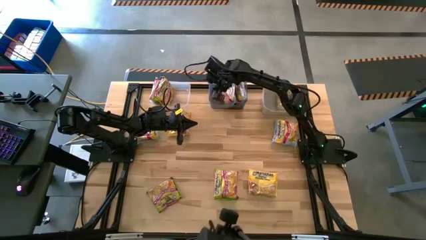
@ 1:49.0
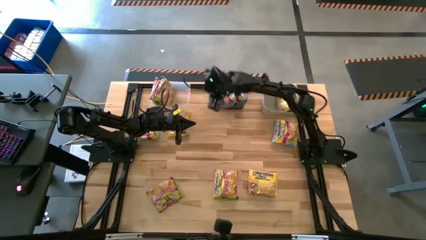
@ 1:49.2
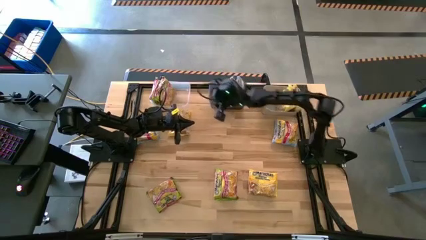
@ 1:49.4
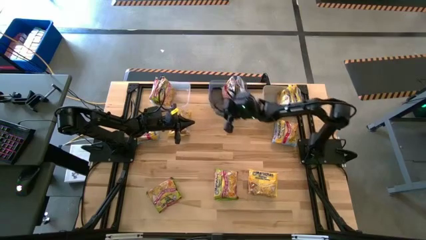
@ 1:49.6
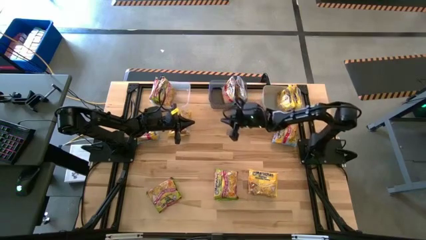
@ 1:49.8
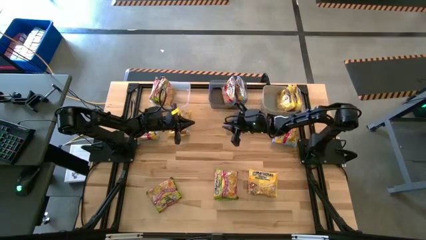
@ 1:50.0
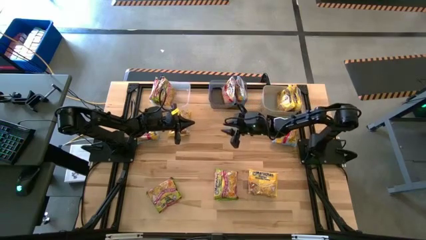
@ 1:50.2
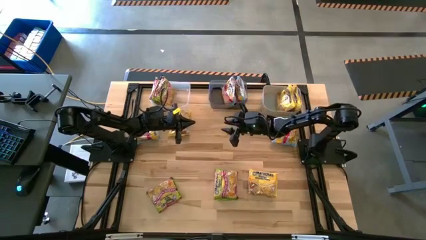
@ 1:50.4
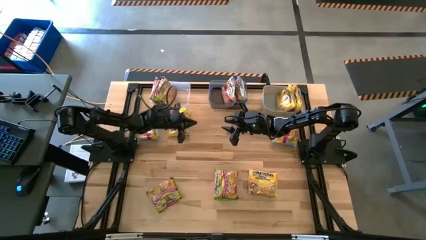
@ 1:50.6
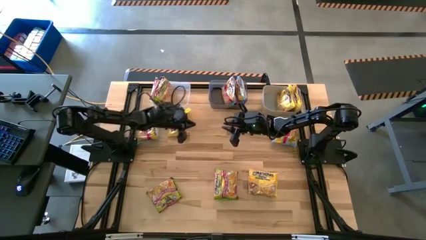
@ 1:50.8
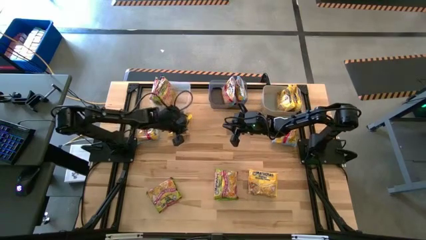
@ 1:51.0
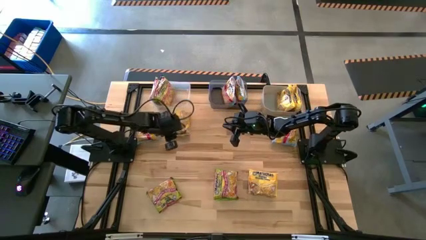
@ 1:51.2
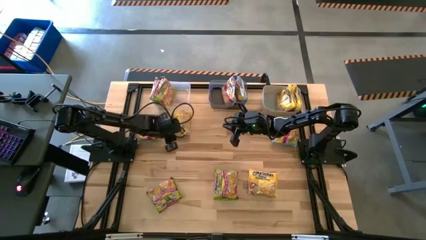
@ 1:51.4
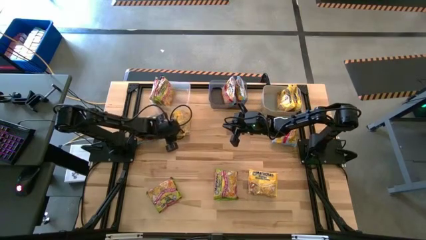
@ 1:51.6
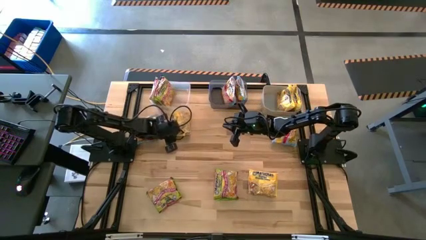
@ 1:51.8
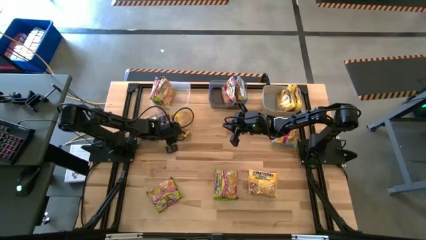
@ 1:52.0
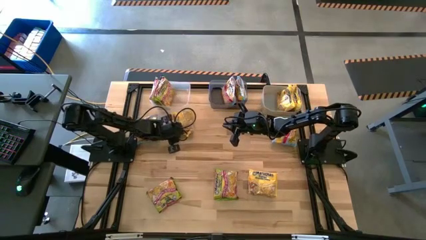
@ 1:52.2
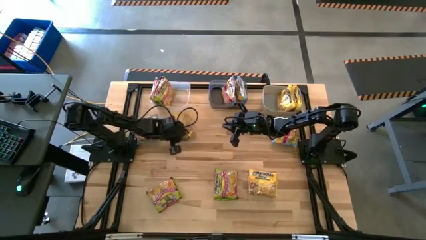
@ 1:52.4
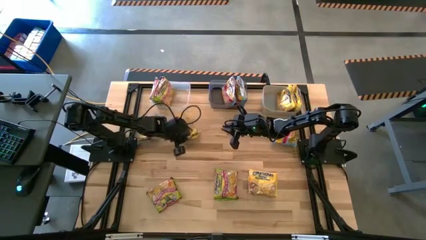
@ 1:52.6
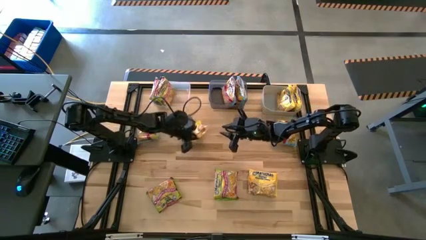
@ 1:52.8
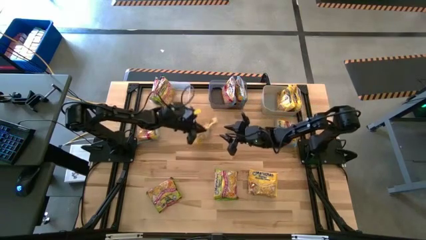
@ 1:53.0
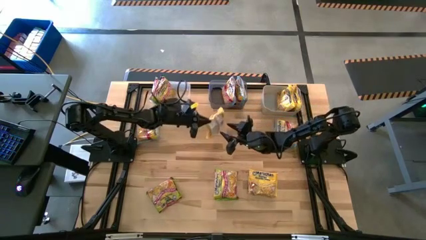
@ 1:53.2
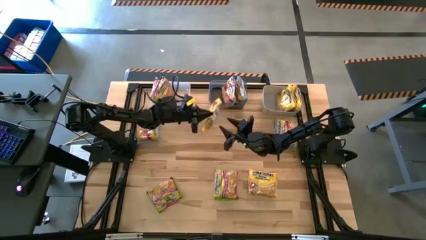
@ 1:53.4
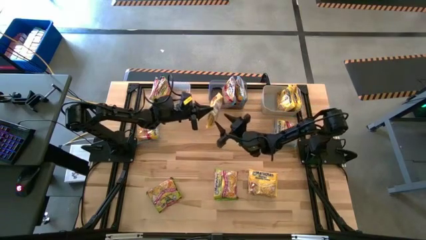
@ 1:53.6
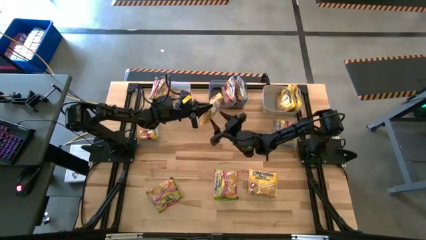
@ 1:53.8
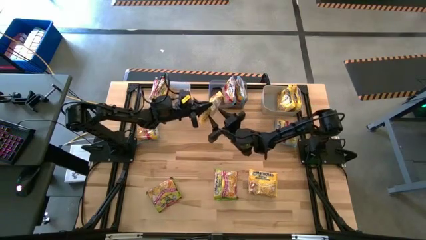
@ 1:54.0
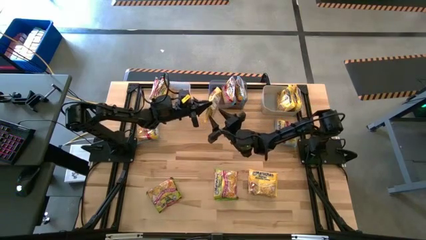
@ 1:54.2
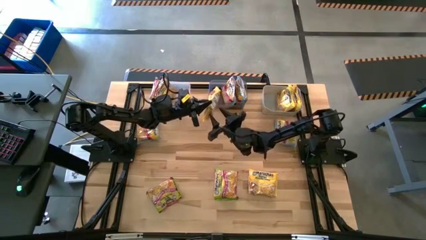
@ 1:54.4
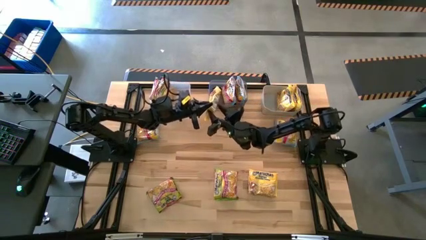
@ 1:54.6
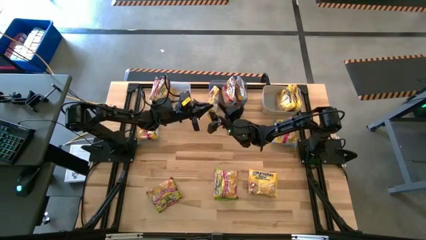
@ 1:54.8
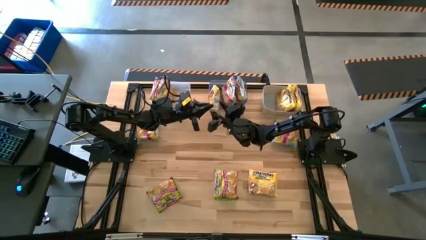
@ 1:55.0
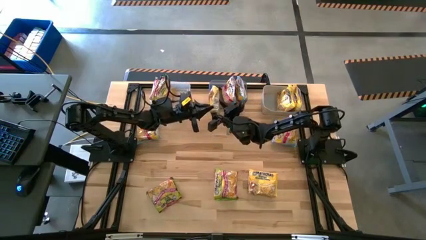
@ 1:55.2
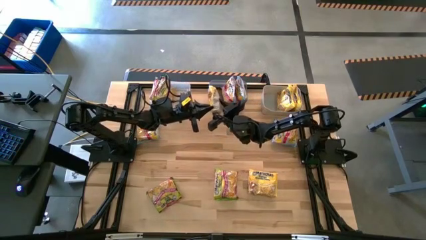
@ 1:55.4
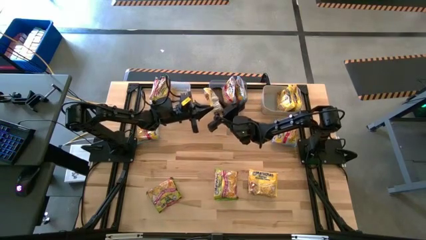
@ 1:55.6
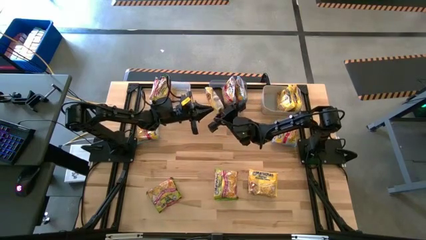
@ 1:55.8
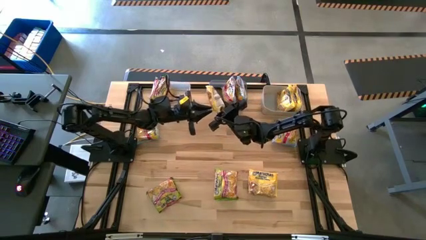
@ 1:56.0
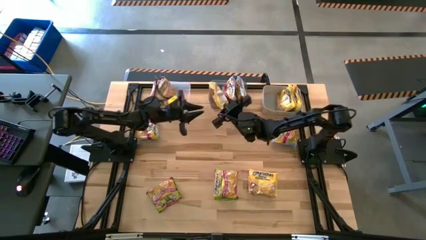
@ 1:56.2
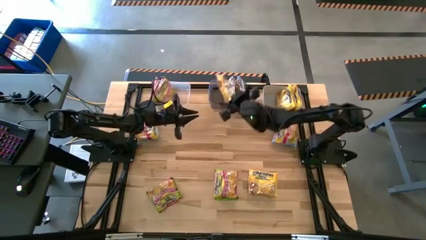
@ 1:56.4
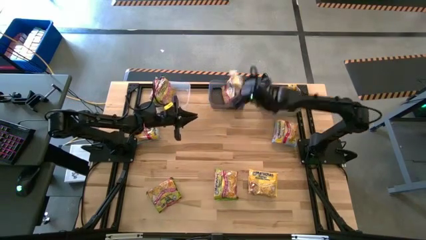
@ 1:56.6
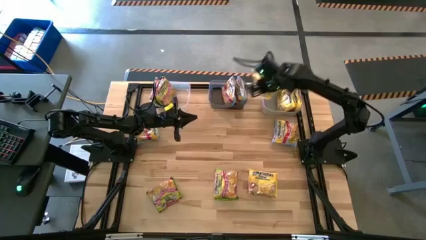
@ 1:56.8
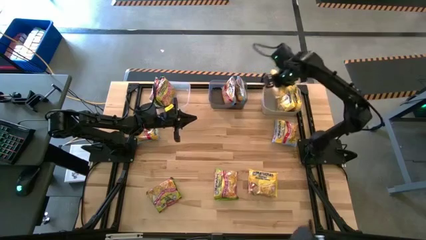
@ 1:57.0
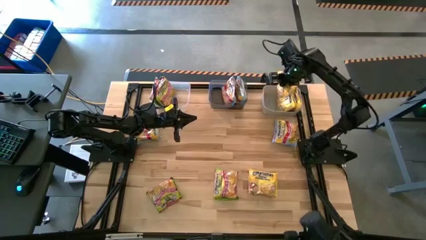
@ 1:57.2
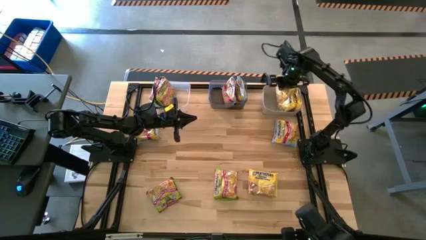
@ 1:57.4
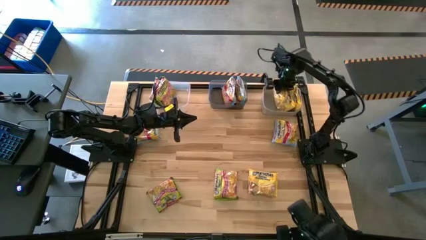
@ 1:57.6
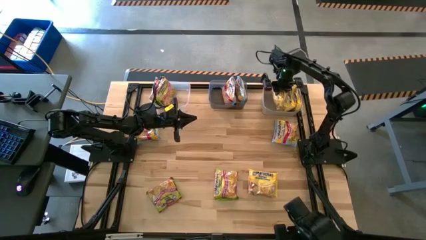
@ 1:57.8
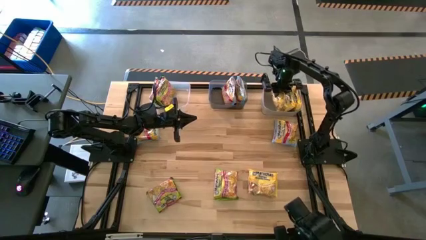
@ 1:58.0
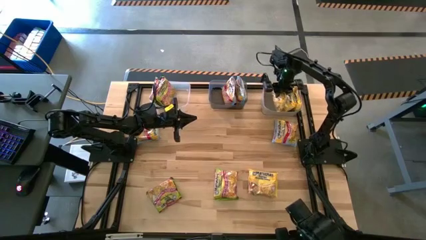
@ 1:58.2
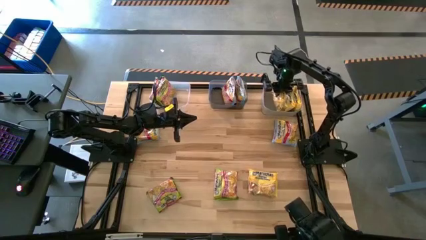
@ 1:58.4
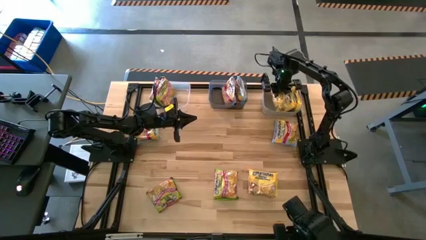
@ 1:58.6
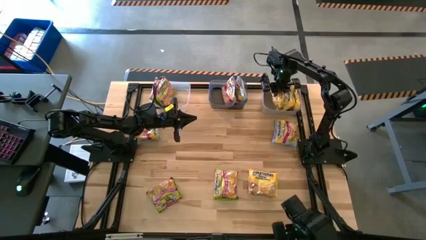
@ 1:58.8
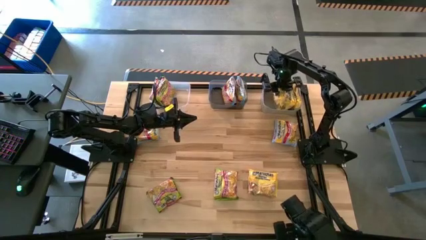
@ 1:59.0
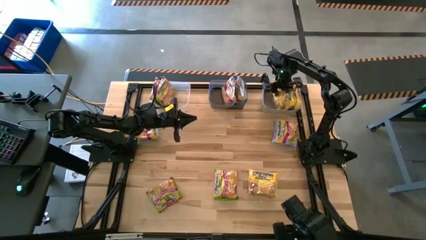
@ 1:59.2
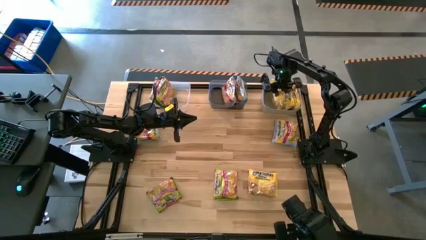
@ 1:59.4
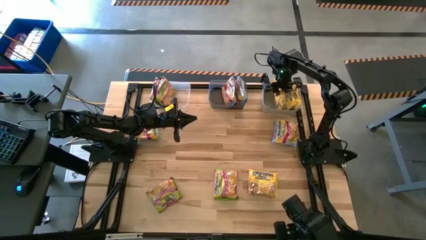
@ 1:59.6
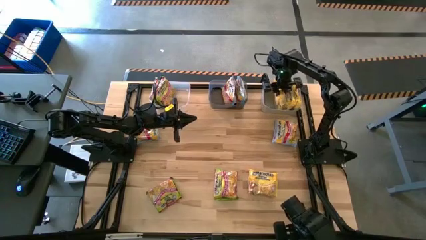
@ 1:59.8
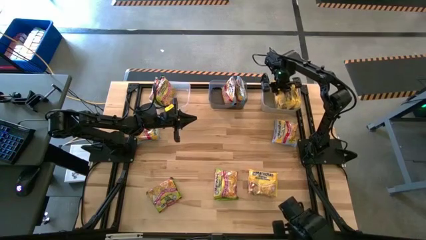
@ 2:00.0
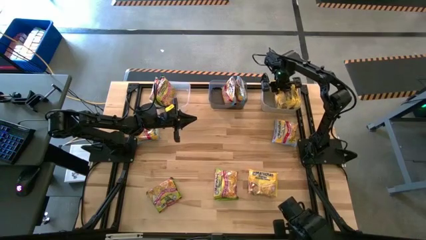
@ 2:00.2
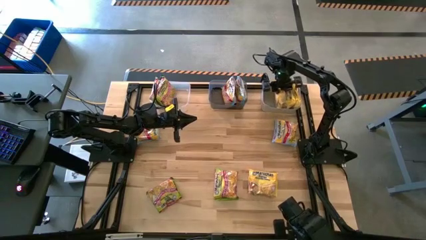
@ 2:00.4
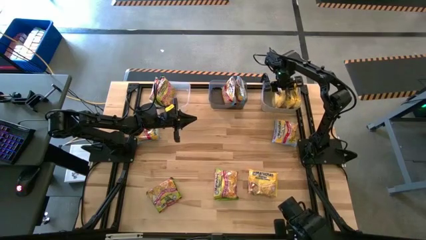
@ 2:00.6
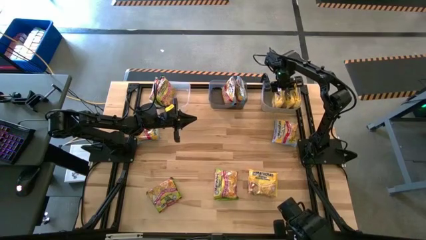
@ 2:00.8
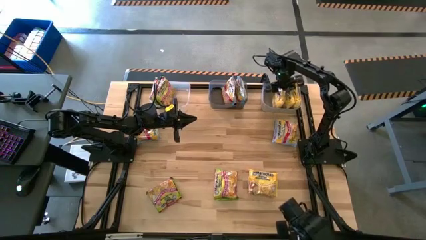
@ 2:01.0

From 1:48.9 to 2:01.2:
Task: Sort Maruchan noodles
Put the top yellow noodle pack into the gray bin

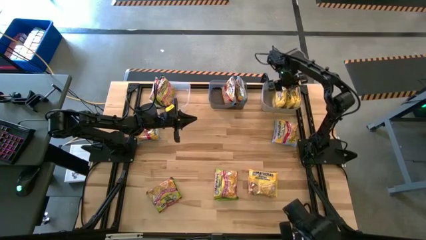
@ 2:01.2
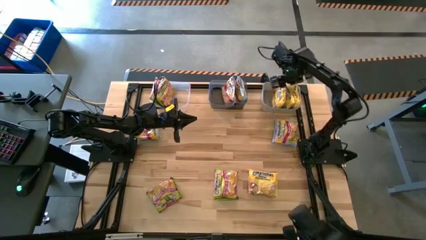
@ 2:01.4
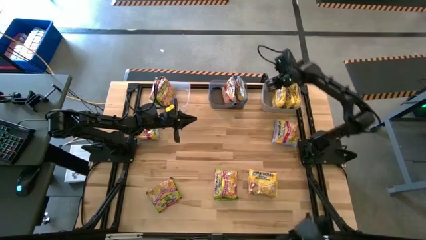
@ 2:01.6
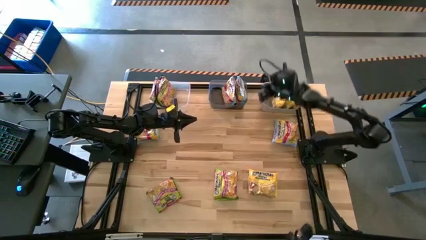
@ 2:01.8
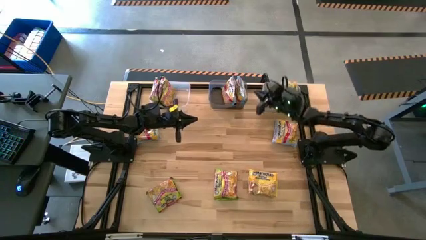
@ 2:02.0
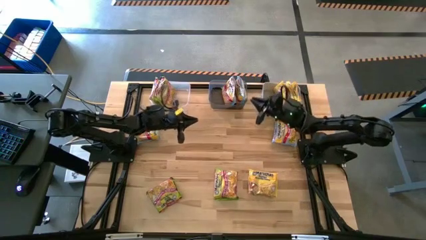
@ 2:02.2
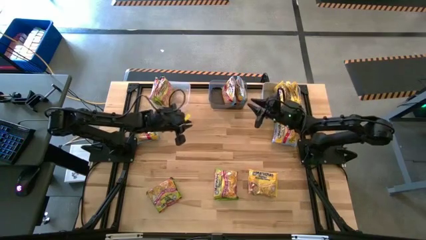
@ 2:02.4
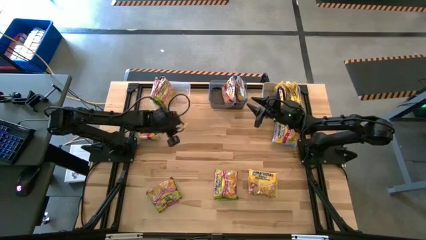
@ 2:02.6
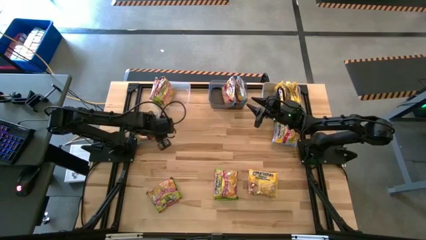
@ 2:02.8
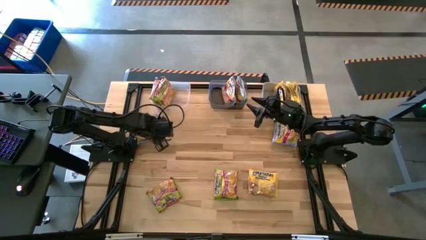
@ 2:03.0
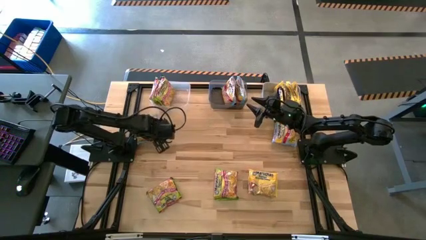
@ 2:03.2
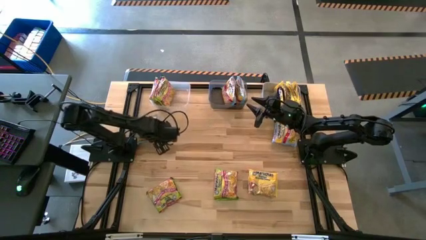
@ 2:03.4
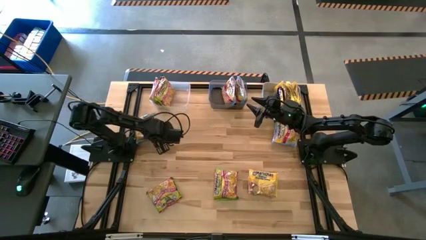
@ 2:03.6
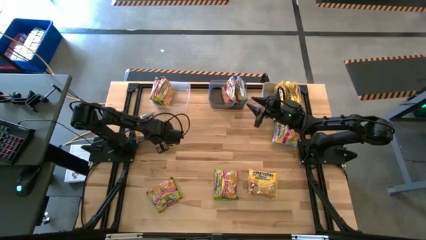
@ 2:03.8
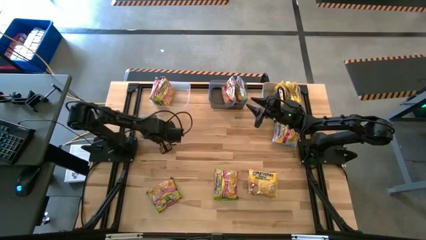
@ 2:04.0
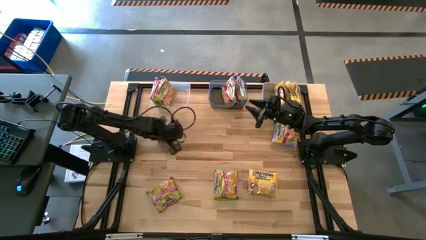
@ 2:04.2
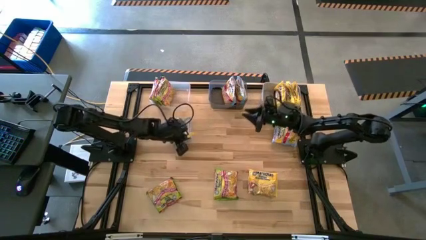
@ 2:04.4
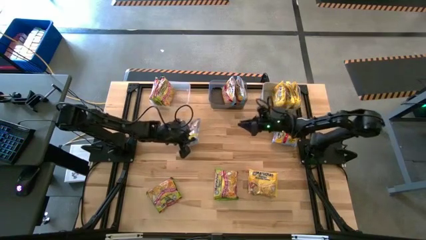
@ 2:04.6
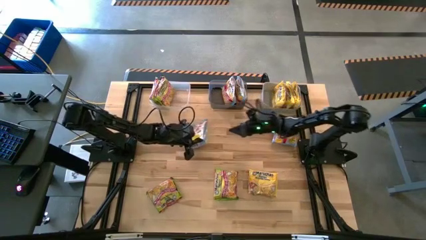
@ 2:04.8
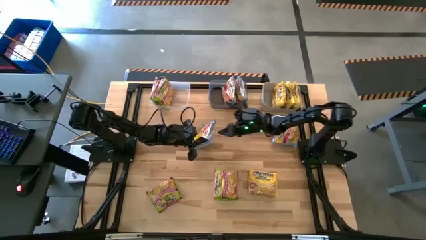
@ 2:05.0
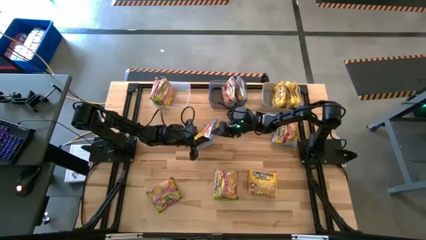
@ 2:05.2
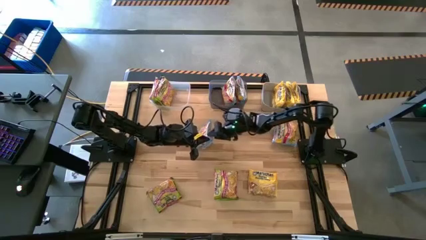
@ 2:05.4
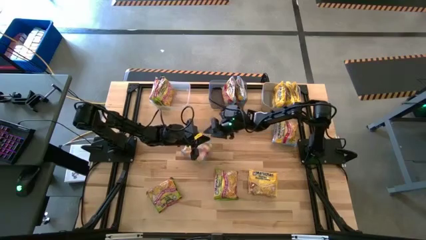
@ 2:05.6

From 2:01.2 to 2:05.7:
Put the left blue noodle pack into the black bin
